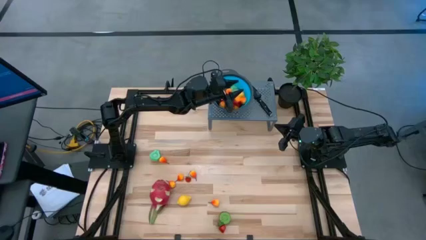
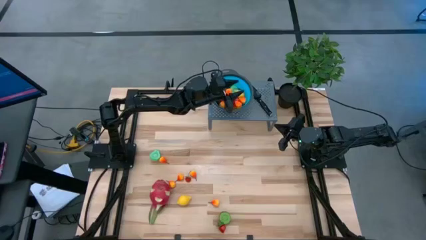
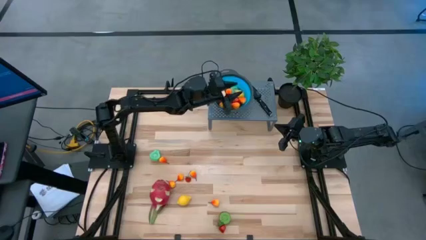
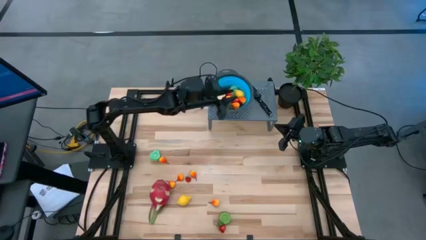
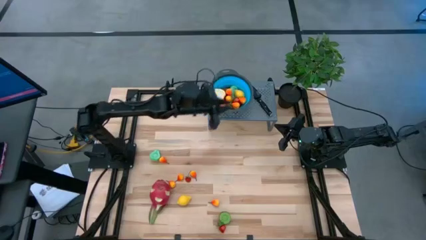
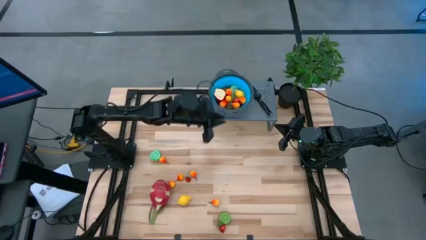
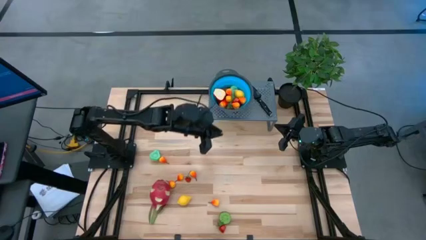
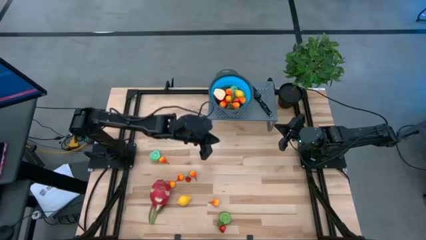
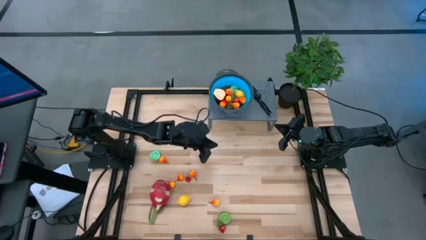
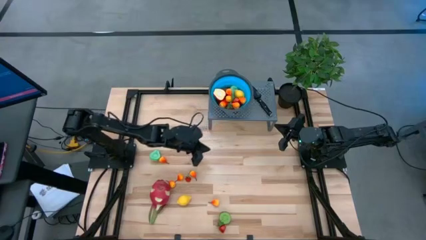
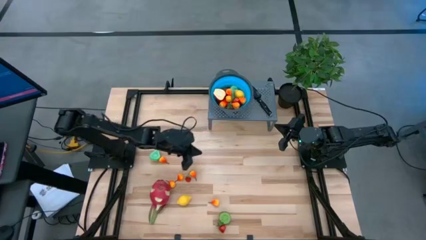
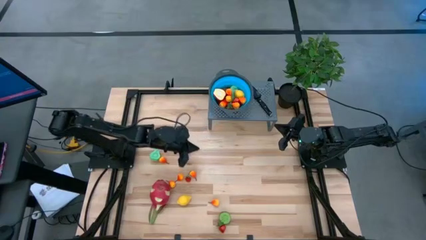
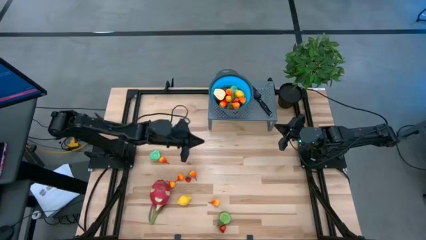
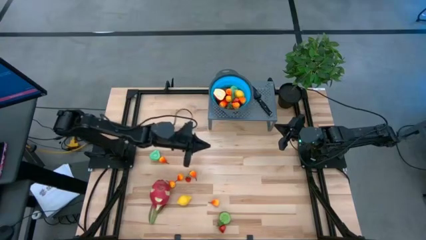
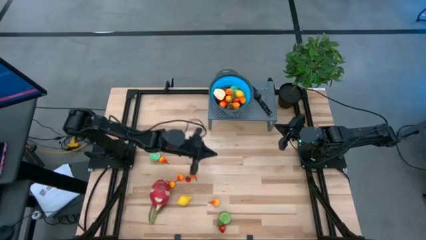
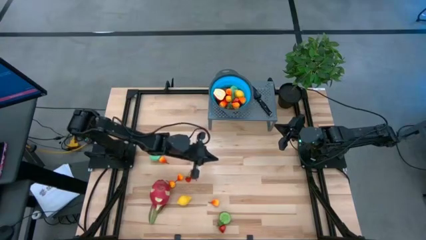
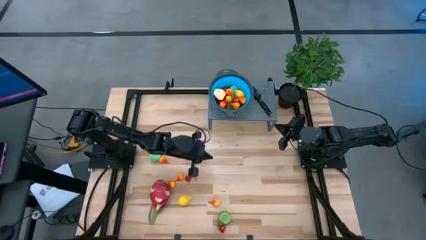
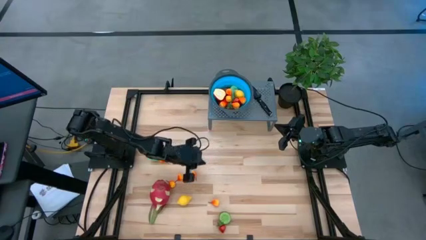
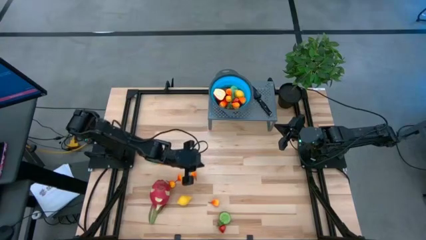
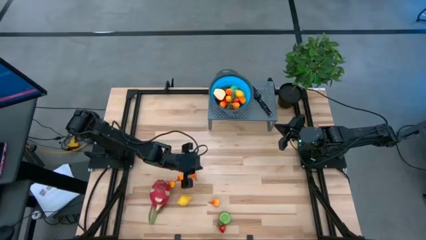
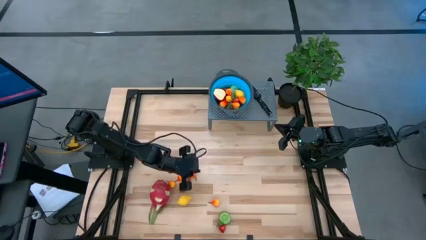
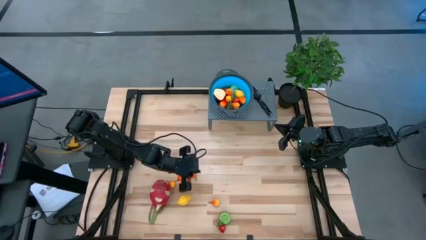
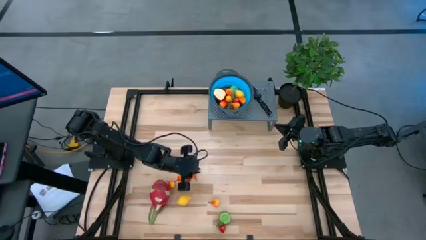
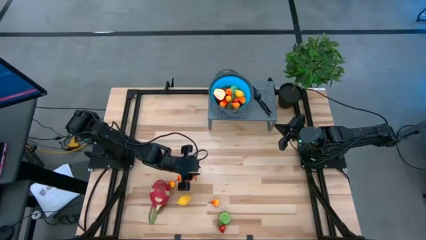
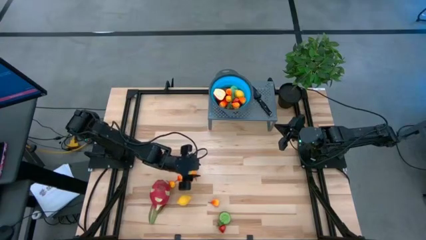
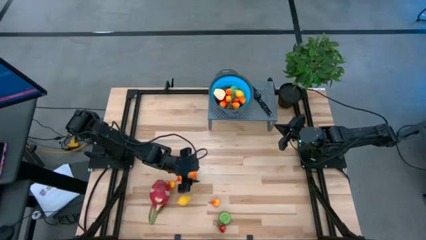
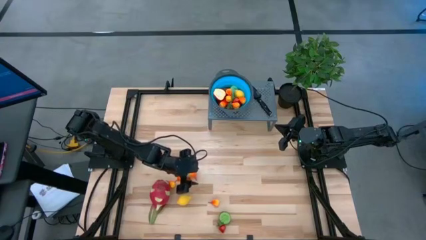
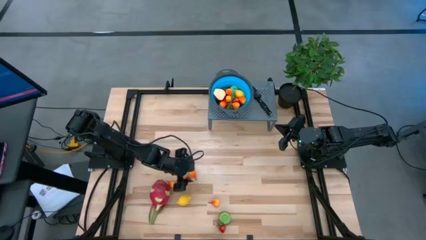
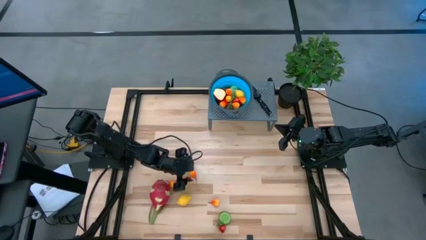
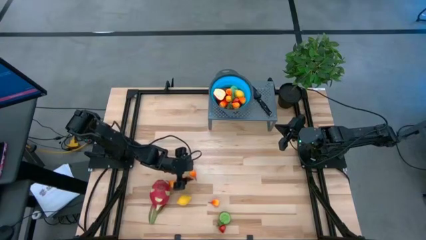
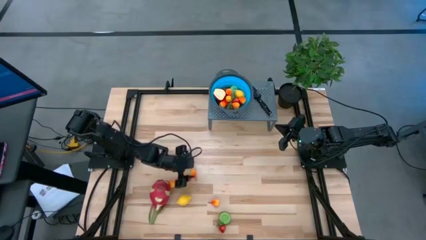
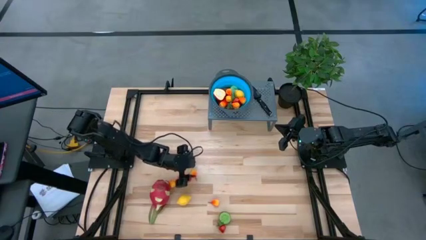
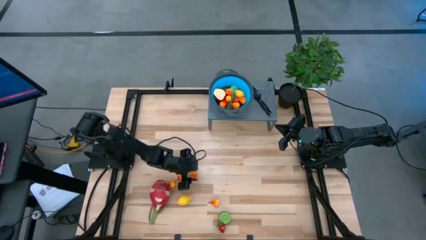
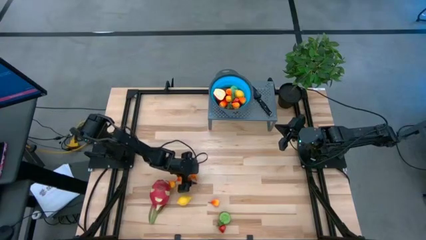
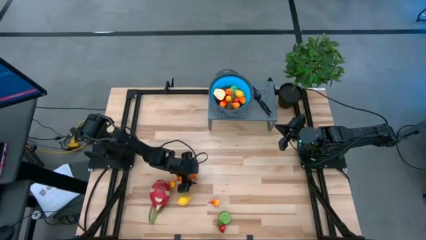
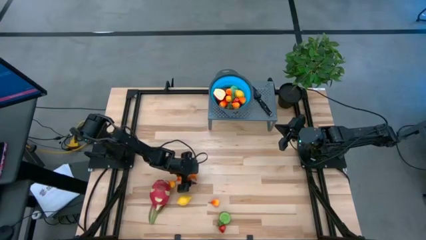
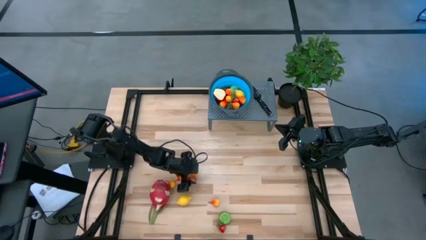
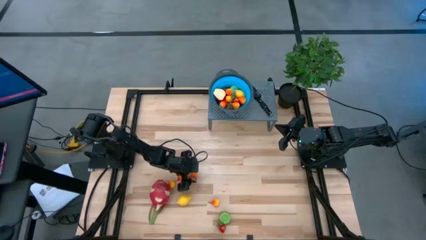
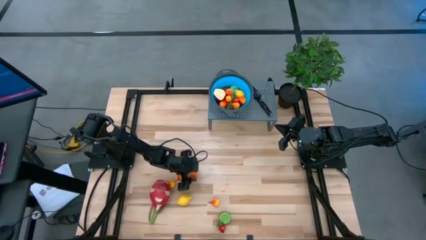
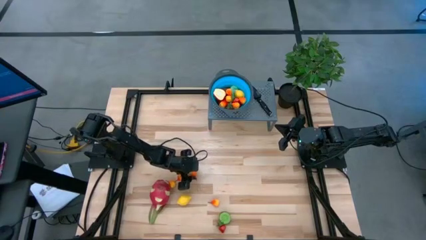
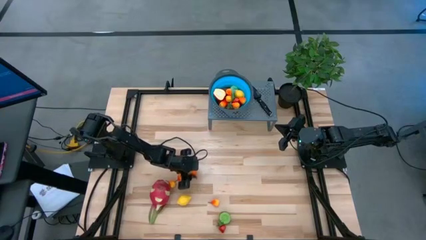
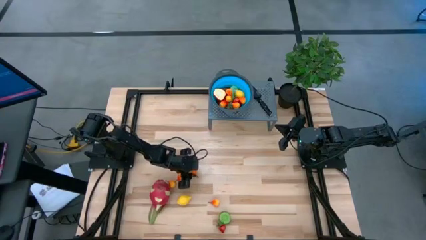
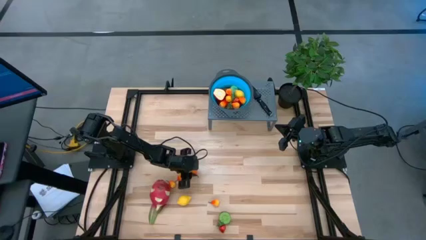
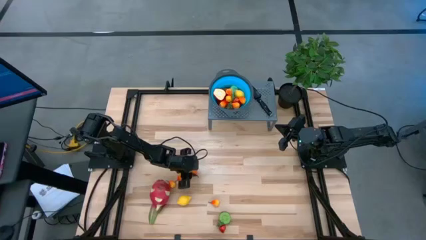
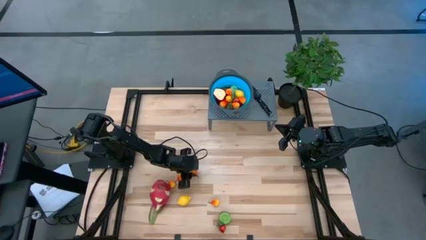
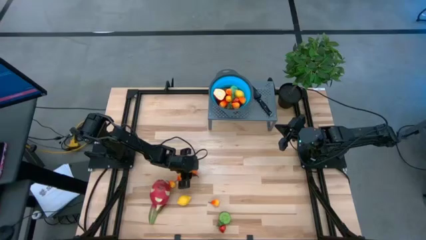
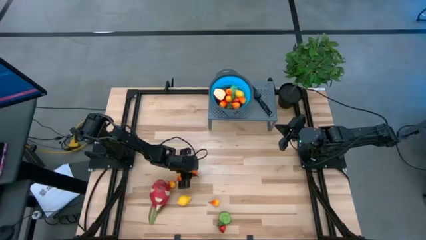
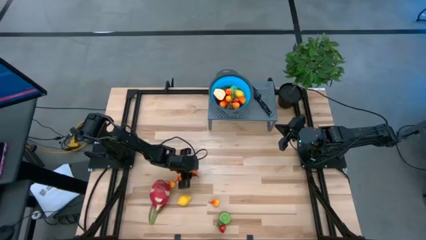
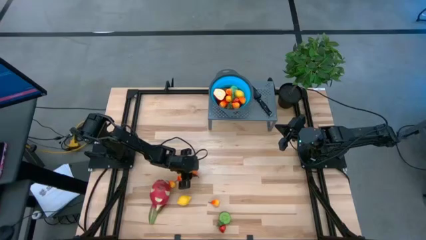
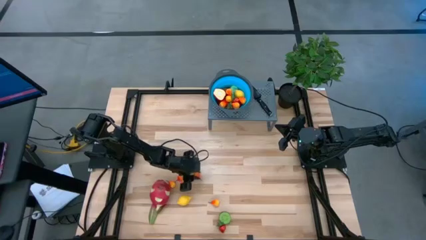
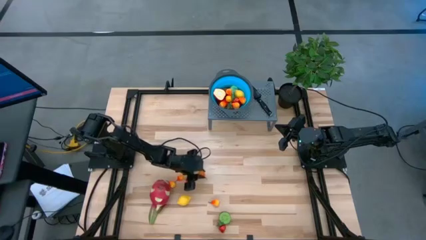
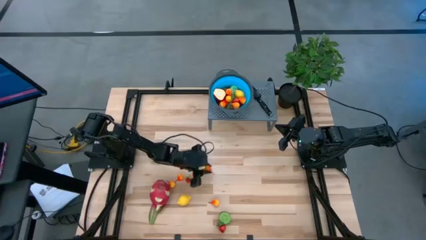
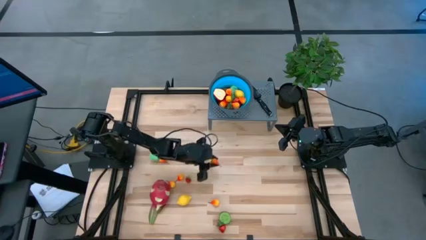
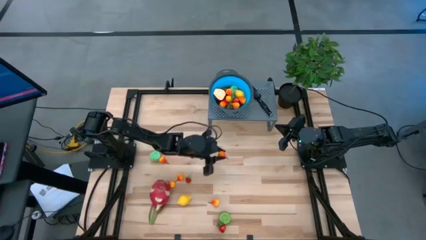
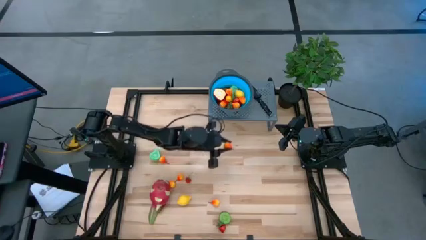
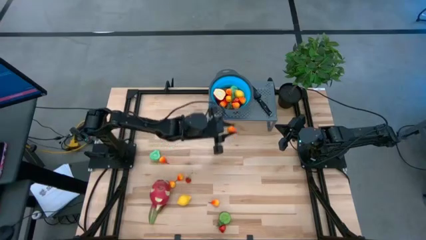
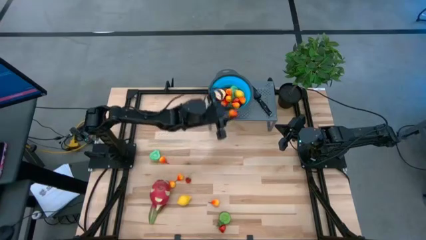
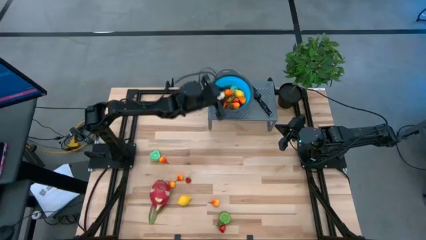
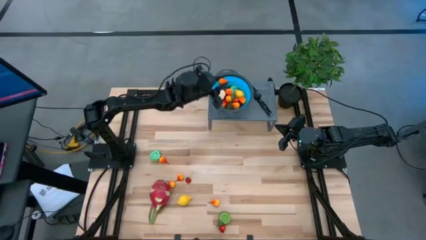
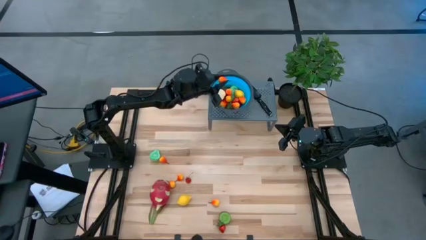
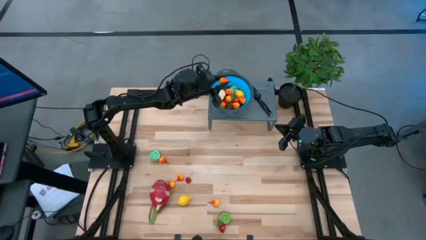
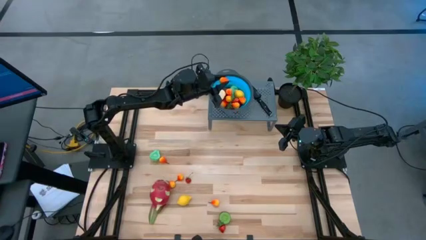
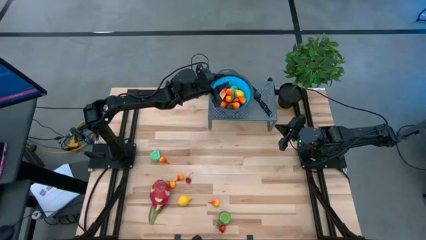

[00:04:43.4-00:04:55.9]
Task: Pick & Place Fruit
Put the yellow pear into the strainer bowl

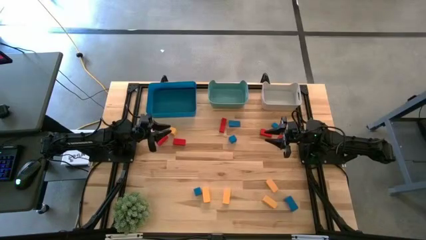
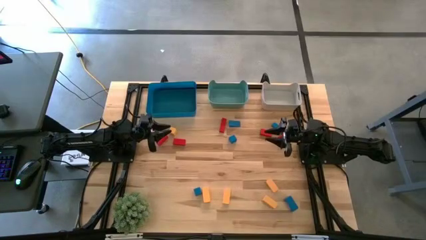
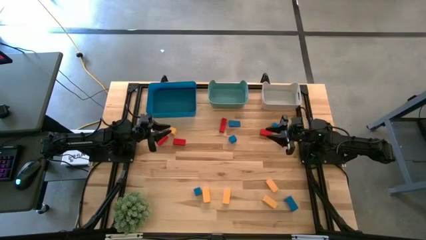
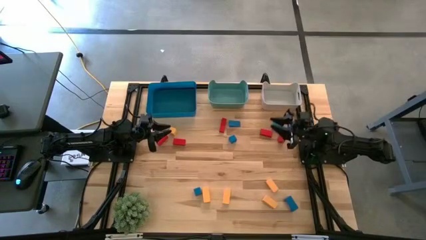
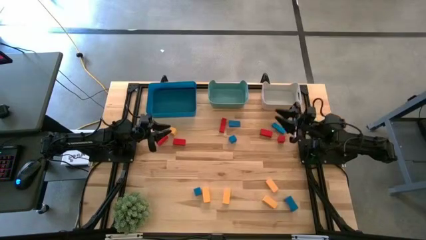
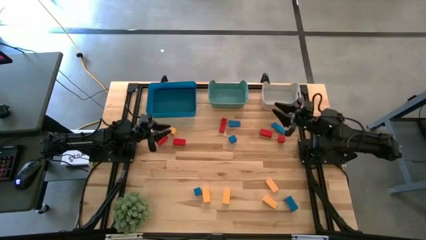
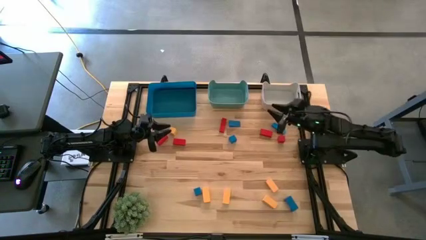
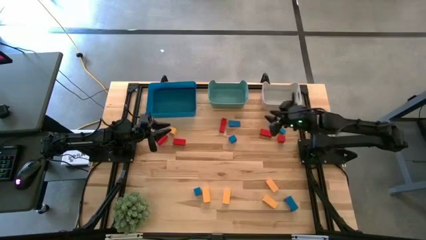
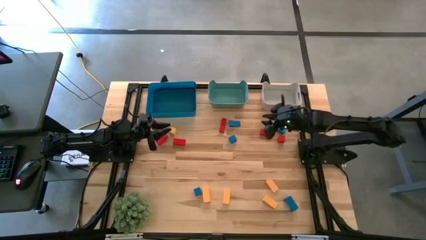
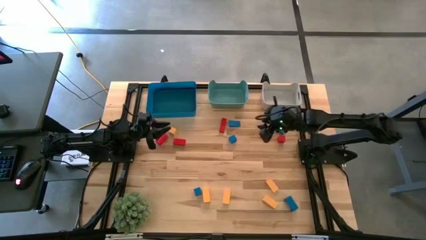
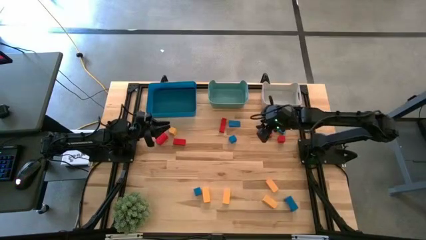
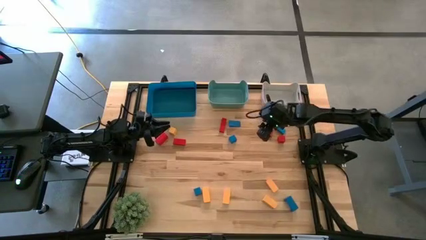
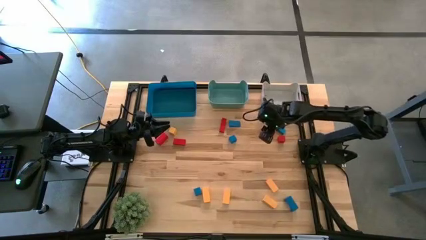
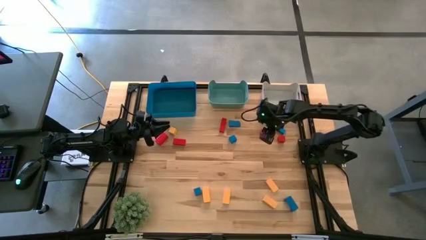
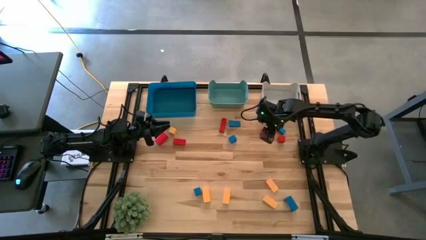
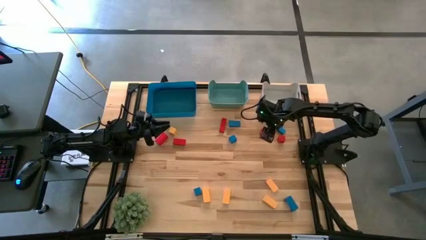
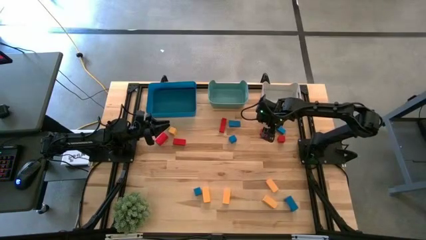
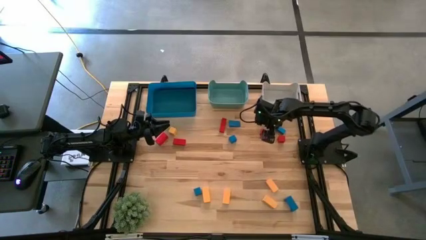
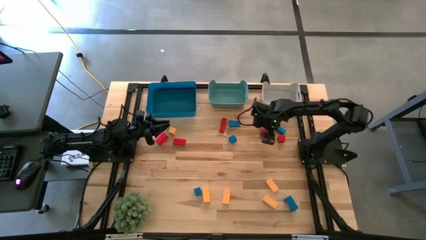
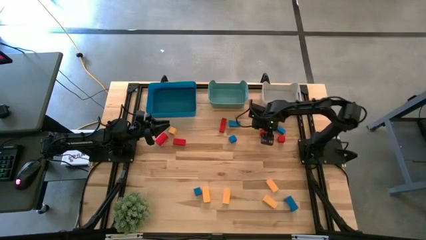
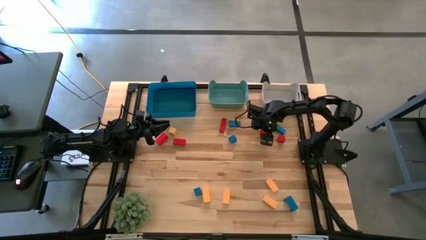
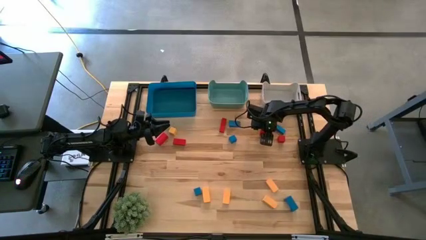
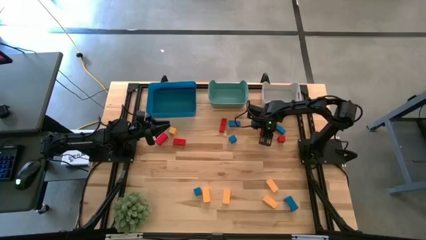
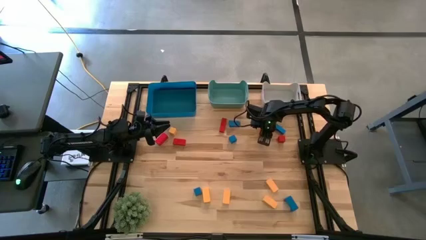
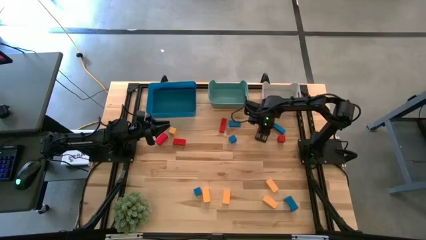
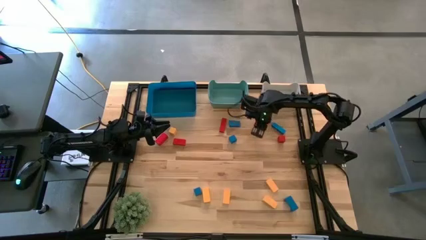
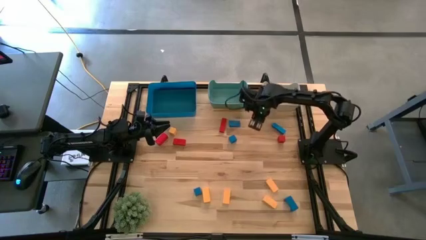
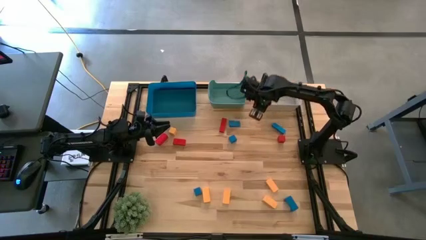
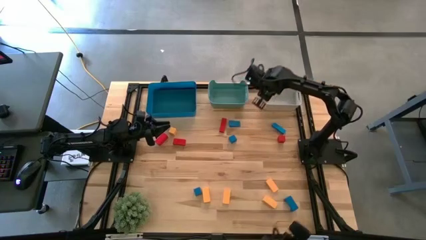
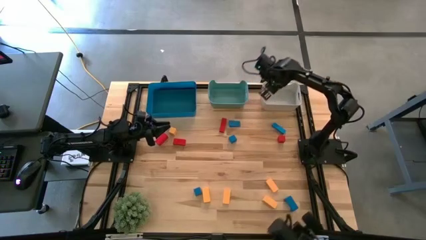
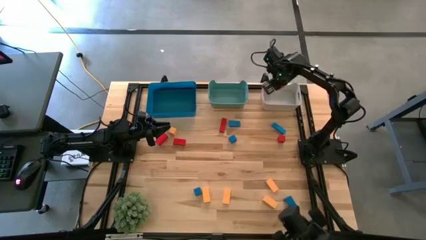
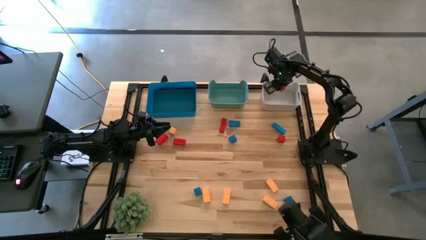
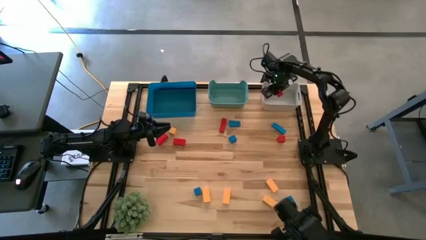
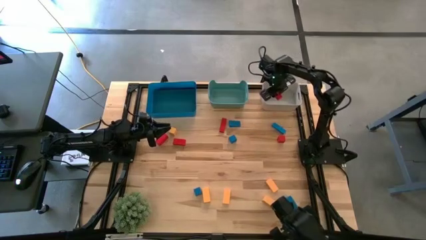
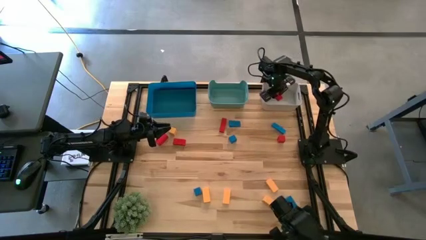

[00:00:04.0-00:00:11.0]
Task: Sort & place blocks by color
Put the red block into the grey bin
